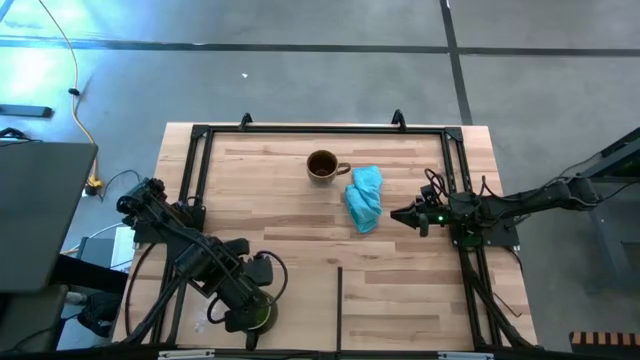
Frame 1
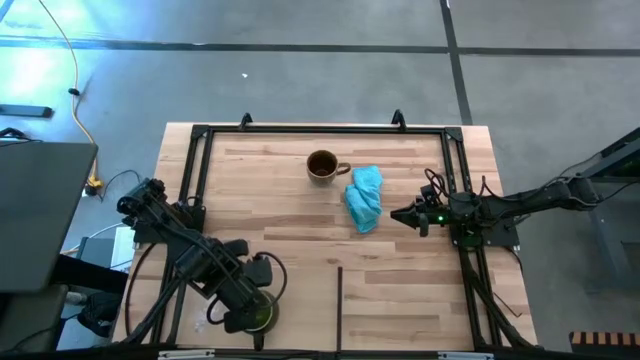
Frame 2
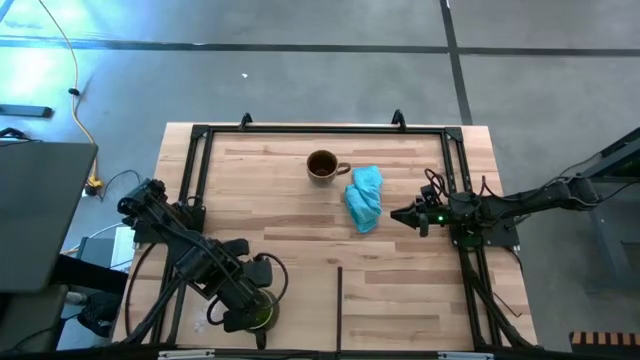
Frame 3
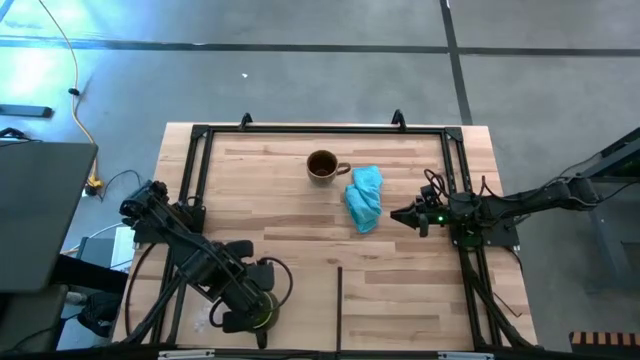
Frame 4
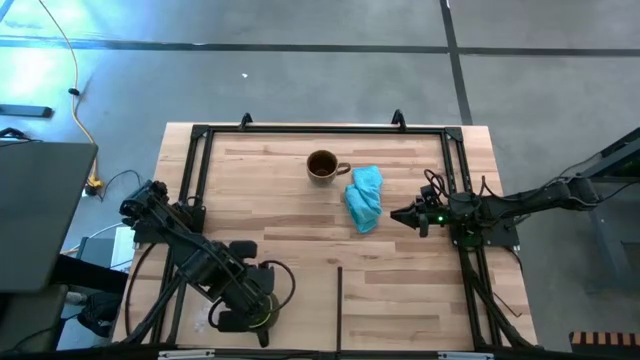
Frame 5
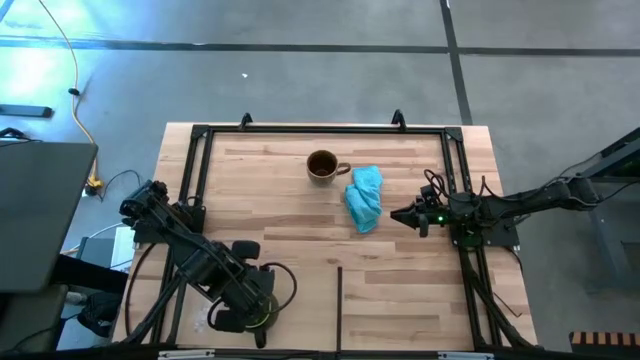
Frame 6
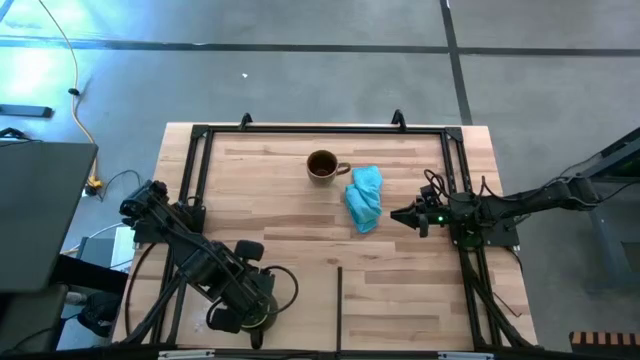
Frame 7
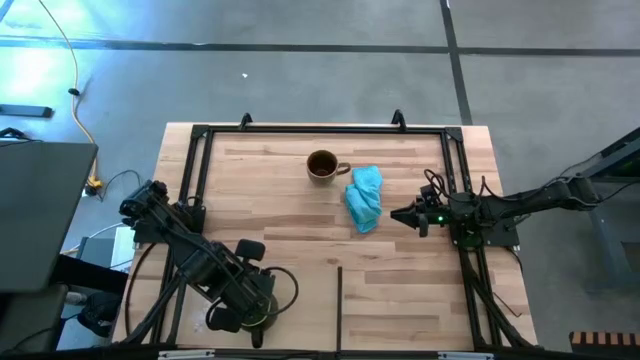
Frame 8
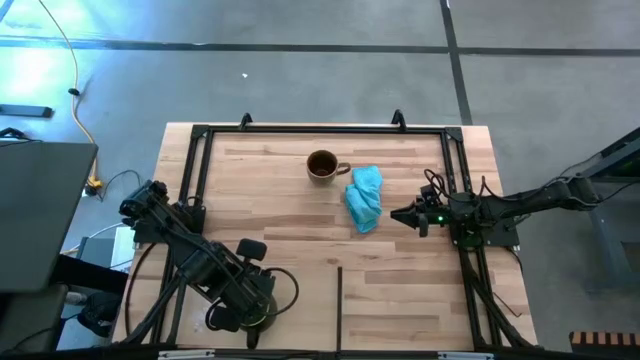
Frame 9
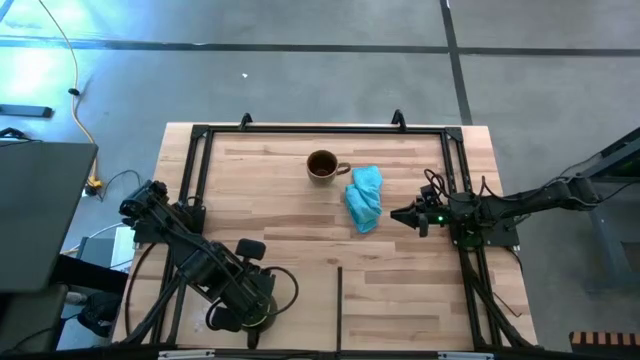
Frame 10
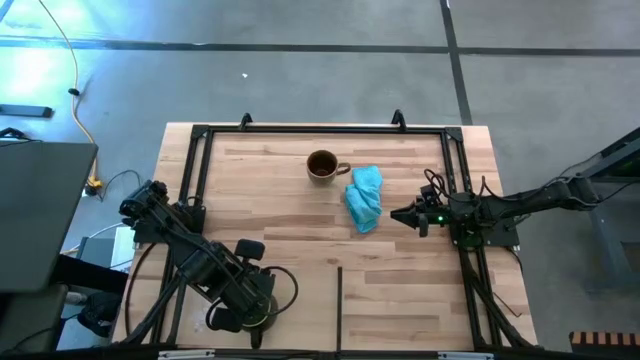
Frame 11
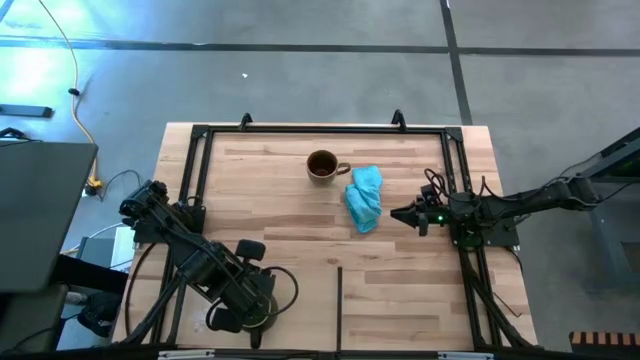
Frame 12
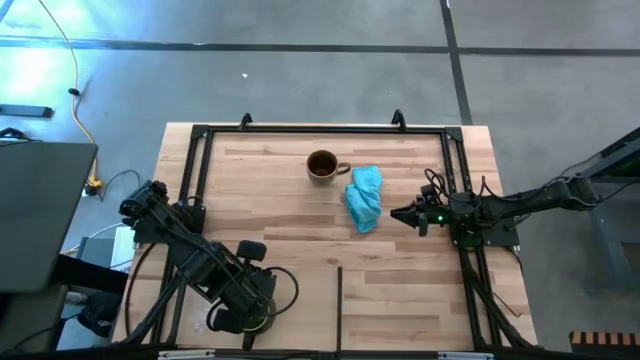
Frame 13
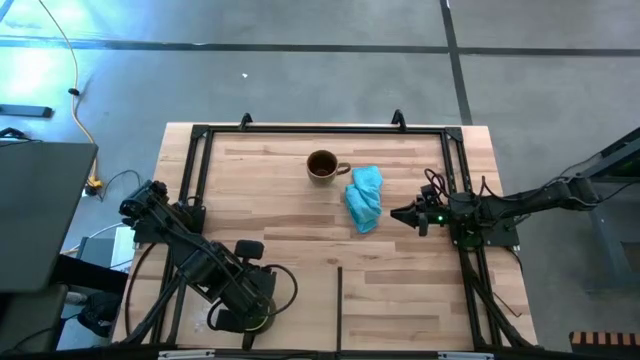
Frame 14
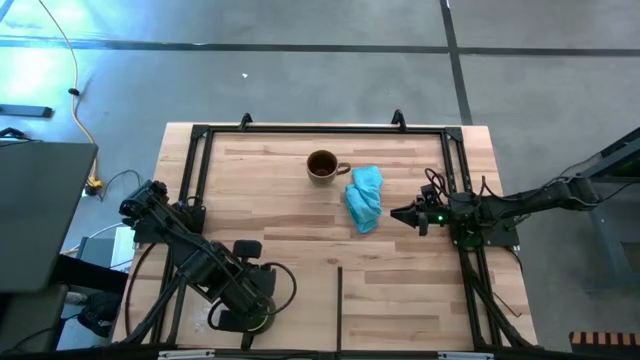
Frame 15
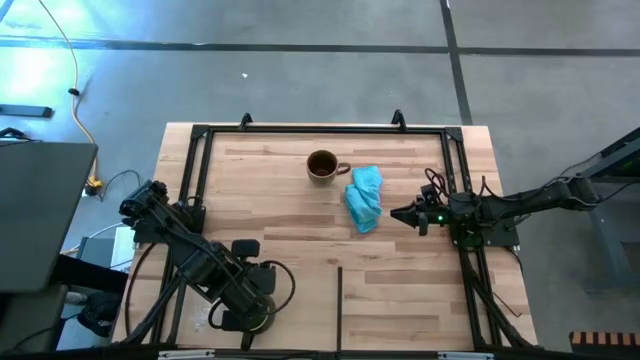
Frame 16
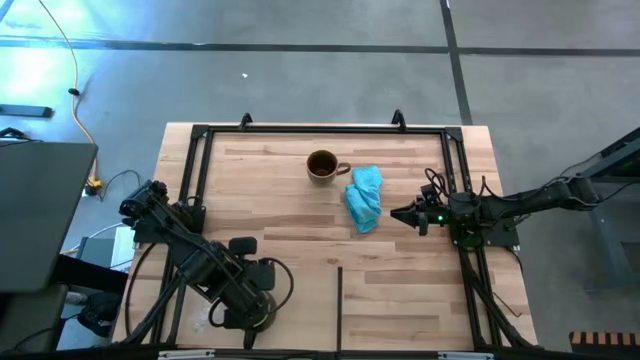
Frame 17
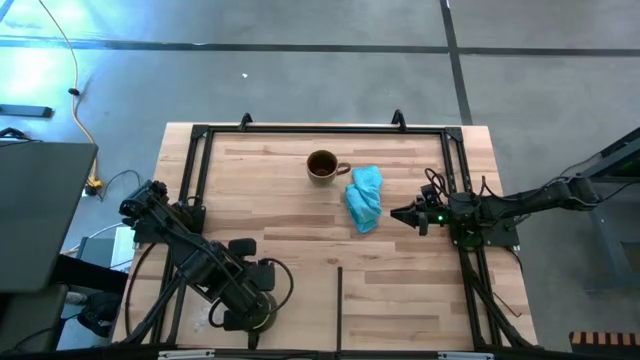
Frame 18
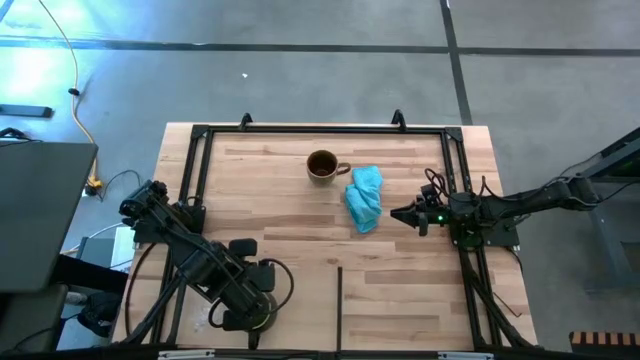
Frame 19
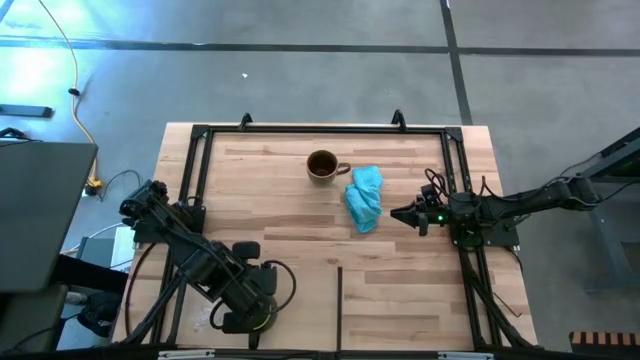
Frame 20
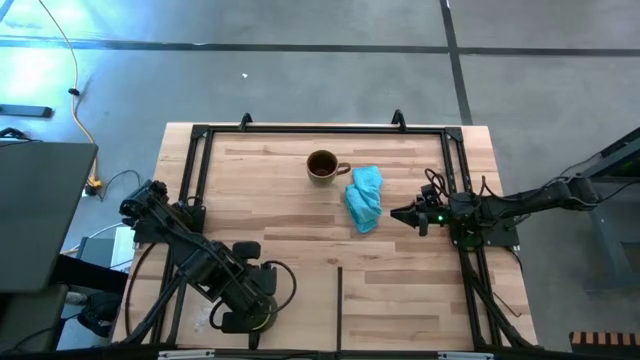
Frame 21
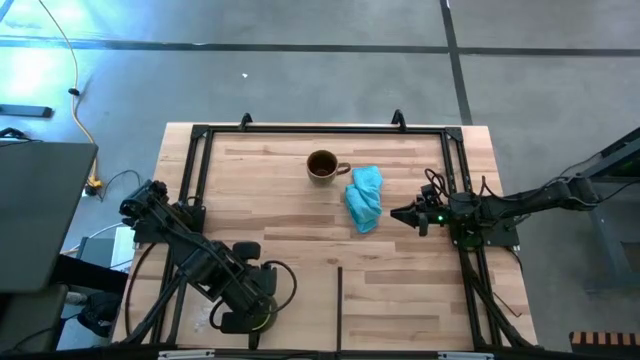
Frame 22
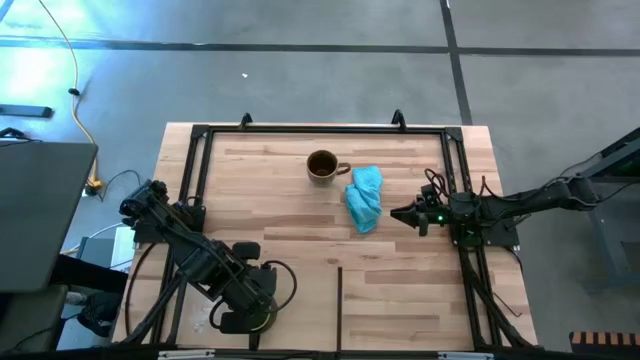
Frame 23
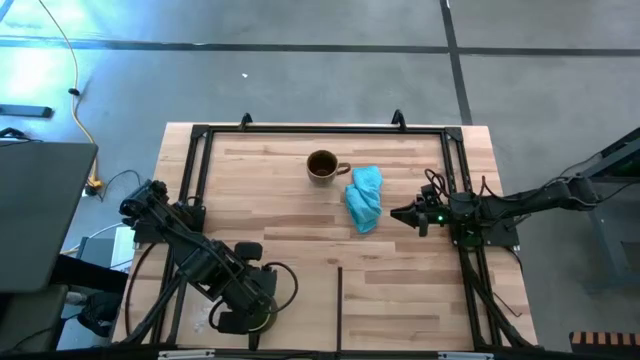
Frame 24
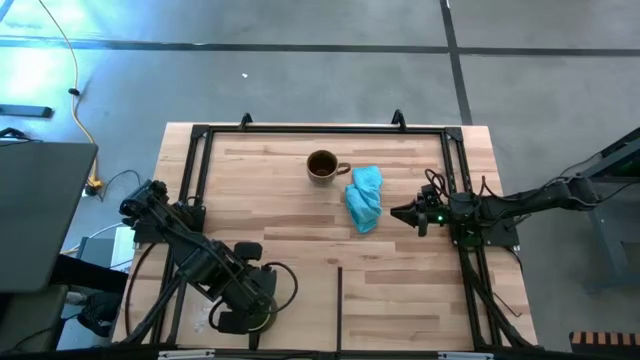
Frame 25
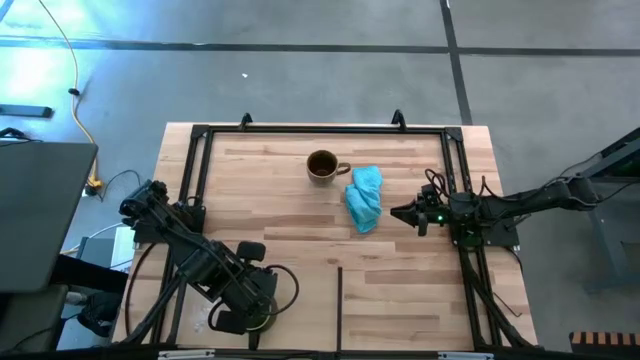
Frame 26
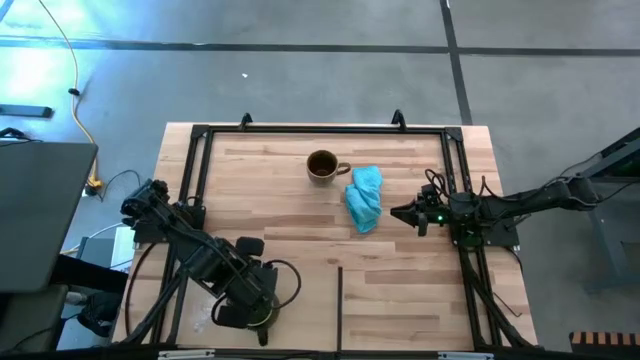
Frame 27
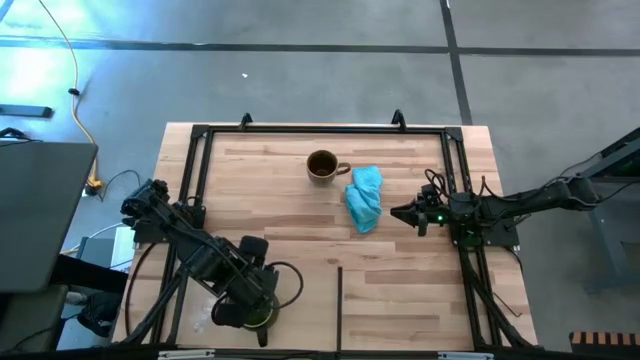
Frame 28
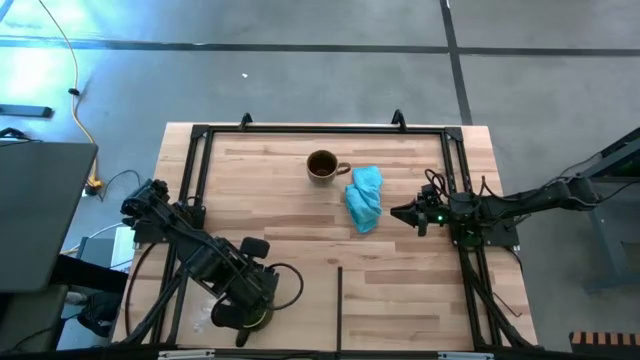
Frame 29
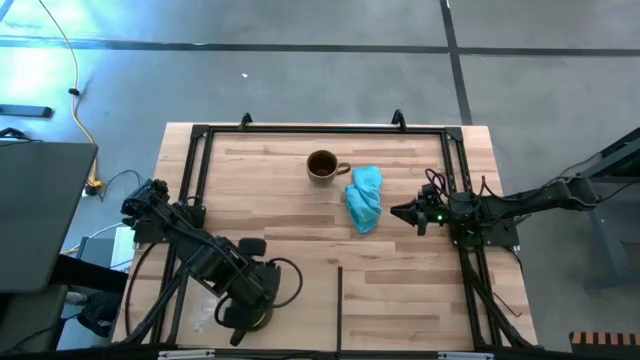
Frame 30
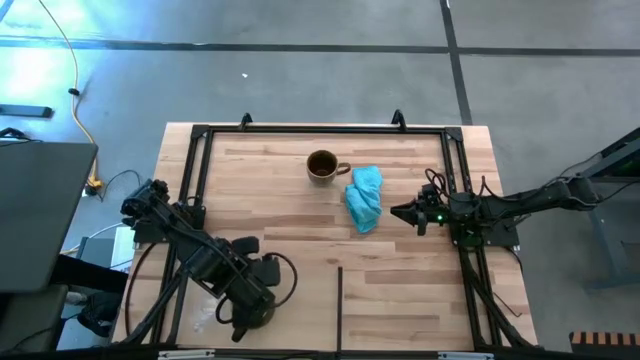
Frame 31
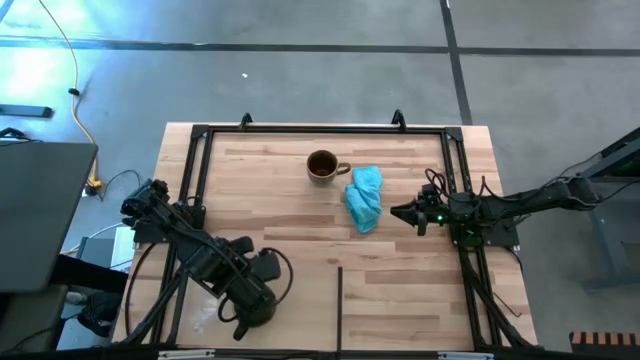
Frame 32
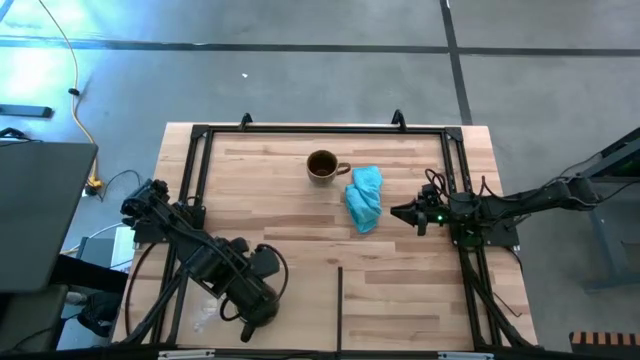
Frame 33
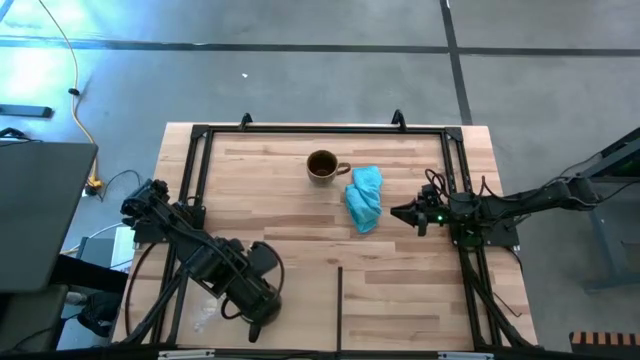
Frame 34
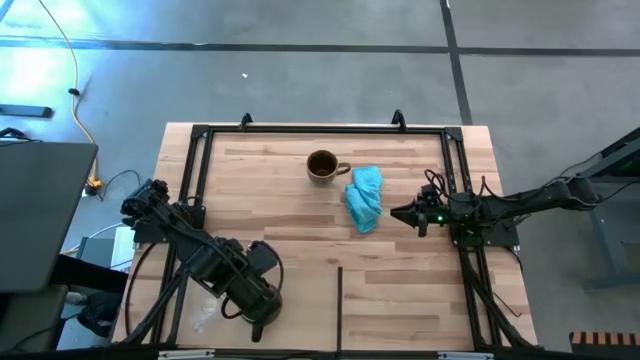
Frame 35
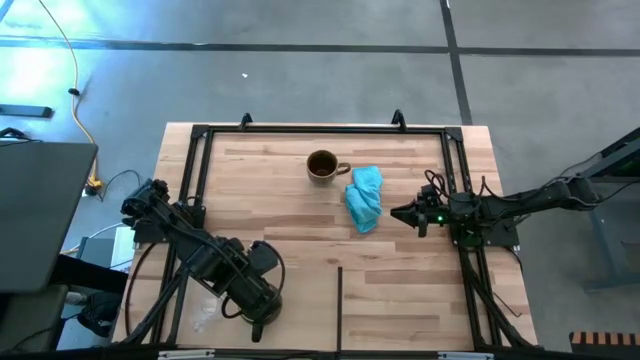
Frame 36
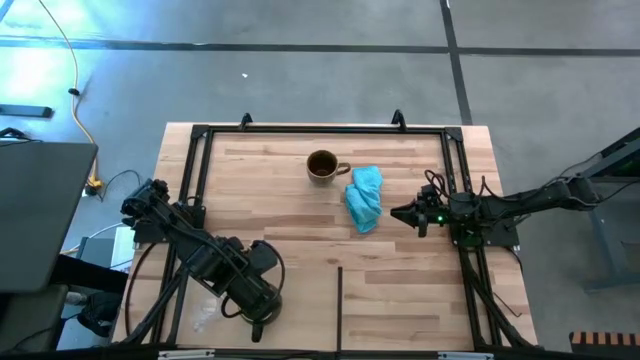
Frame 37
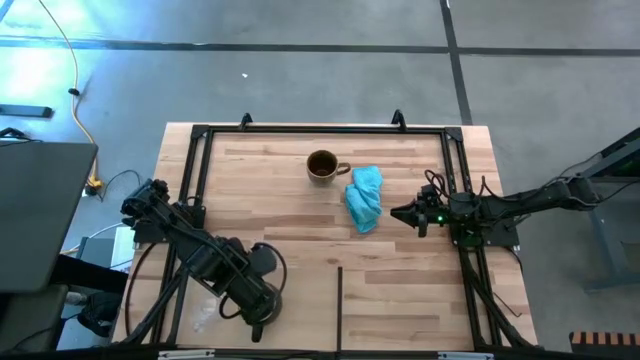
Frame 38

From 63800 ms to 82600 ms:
Task: Stack small to large cups/mugs on shelf
Put the black mug on the shelf

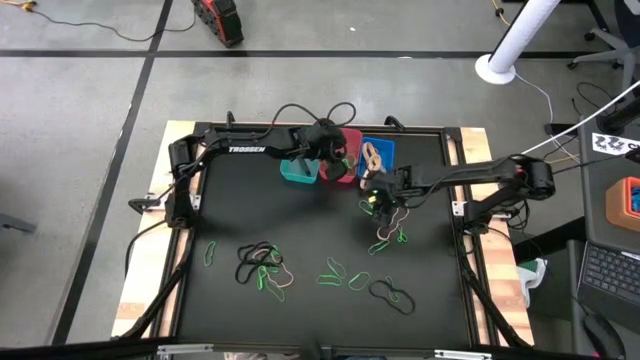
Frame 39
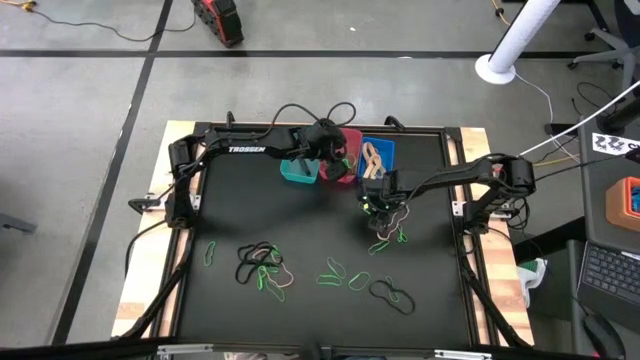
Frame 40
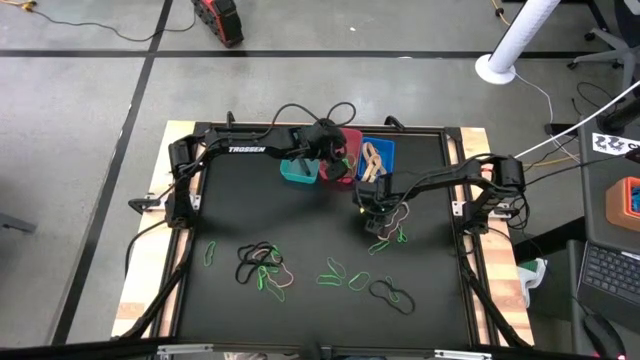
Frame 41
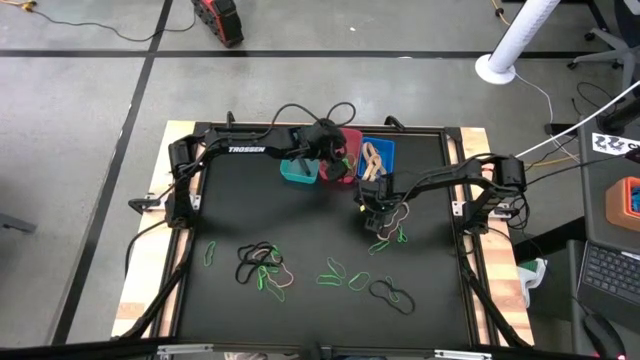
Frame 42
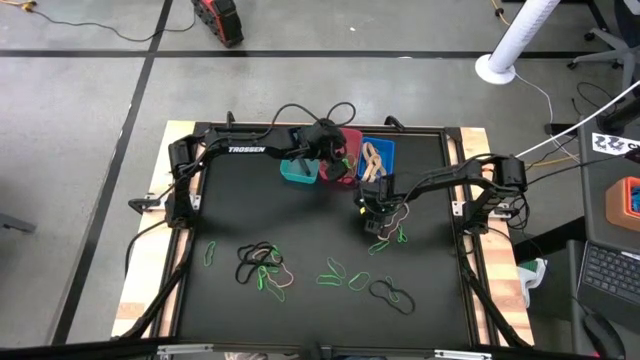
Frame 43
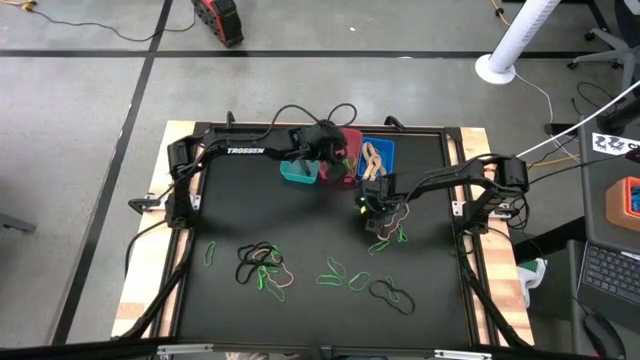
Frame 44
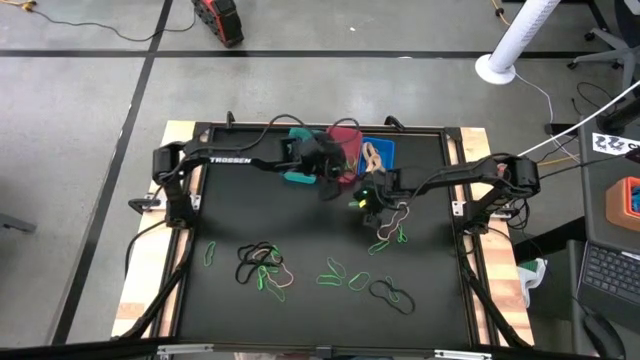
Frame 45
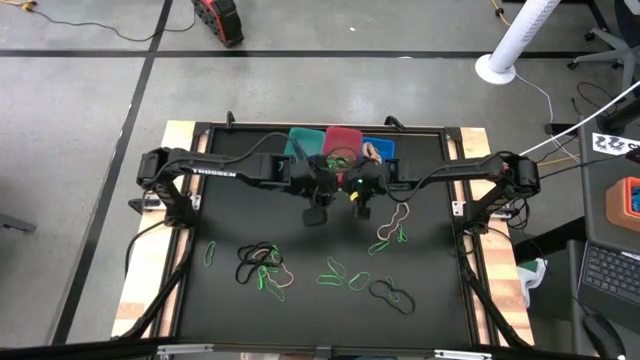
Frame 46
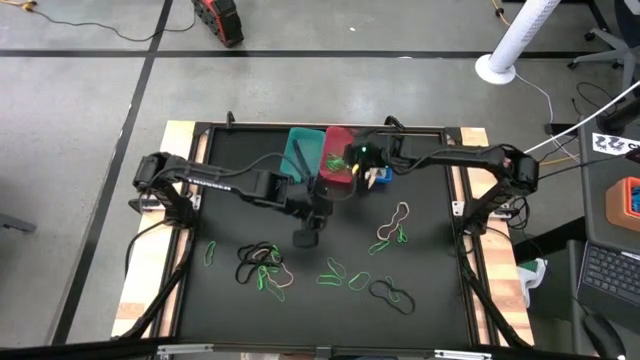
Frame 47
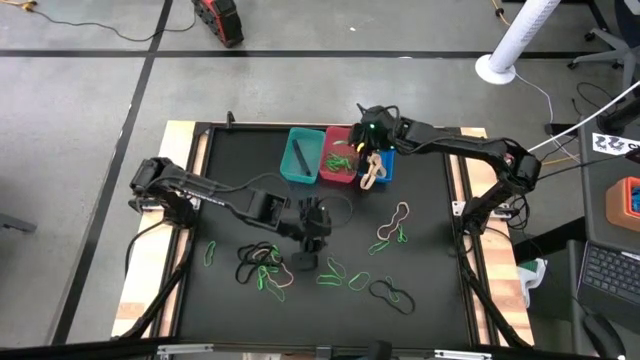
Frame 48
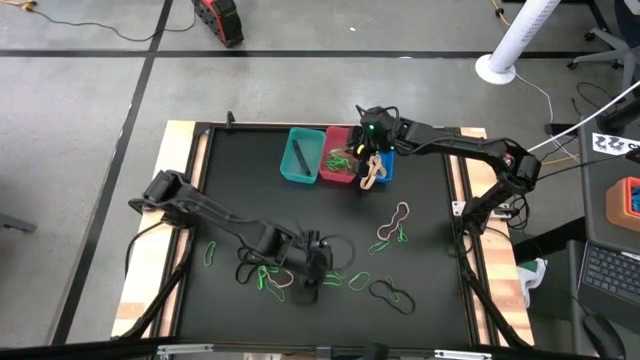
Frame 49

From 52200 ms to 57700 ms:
Task: Sort rubber bands into baskets
Put the green rubber band into the pink bin
